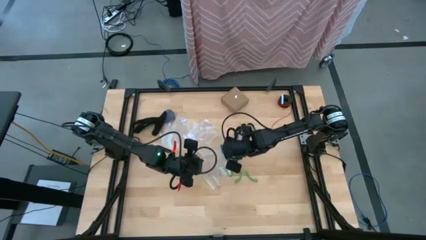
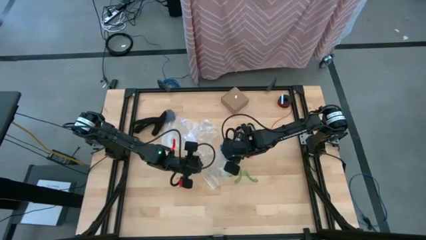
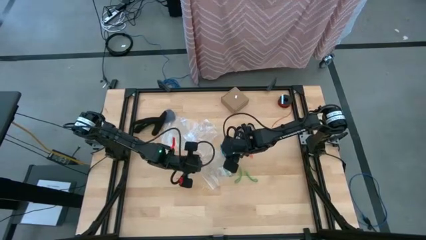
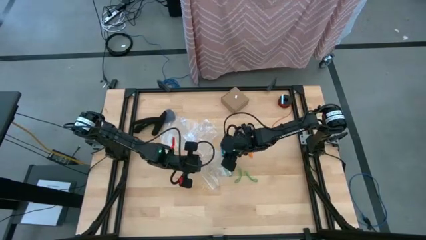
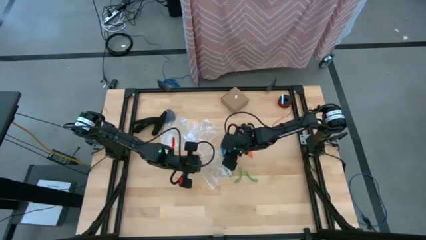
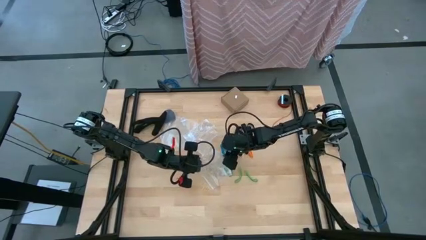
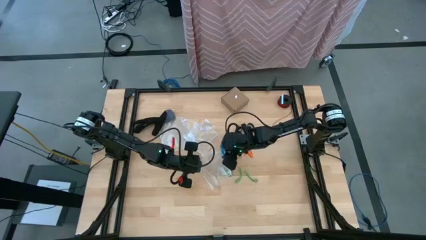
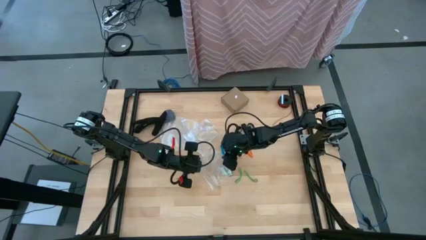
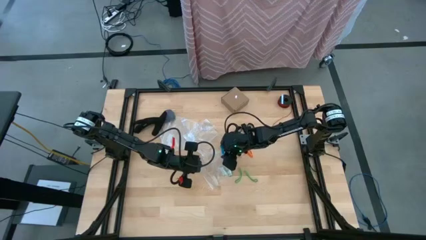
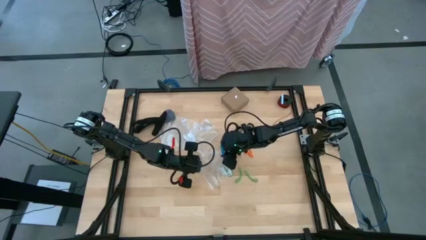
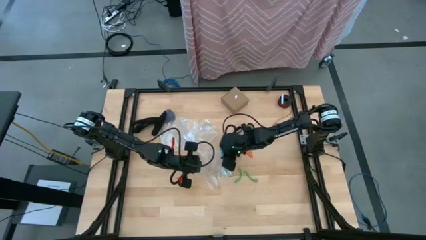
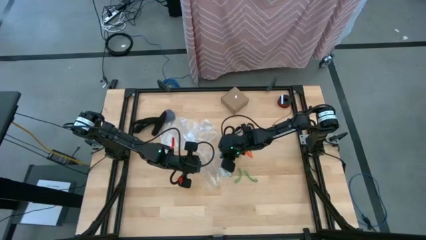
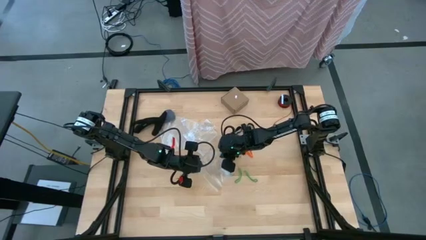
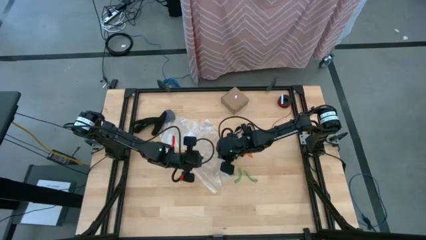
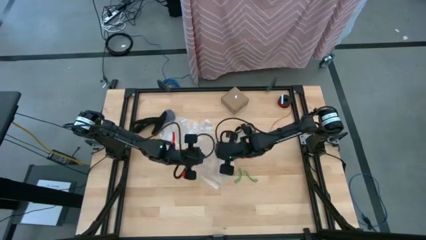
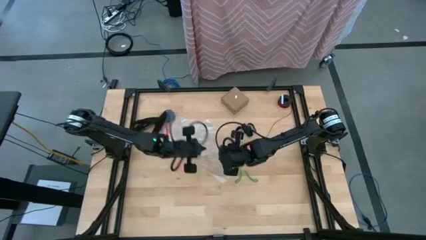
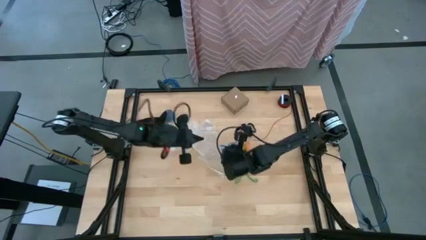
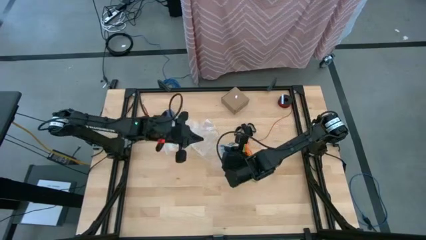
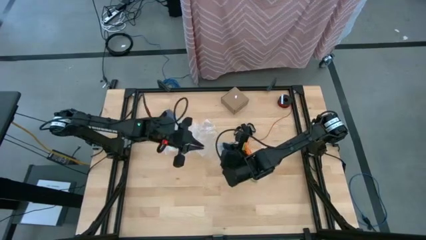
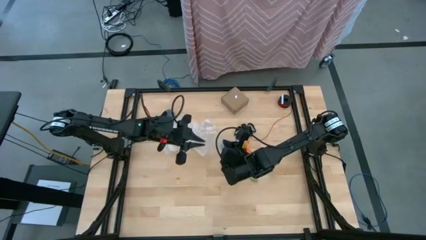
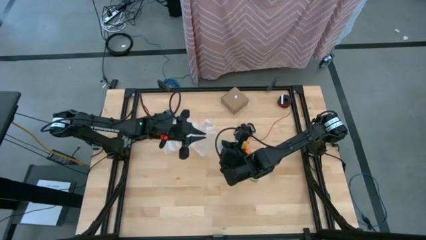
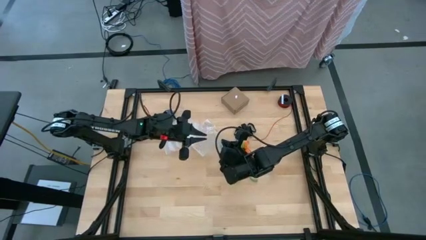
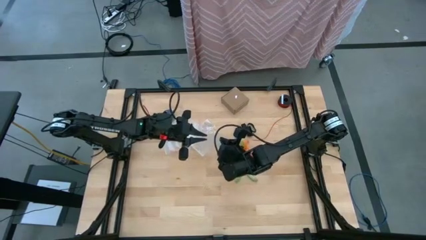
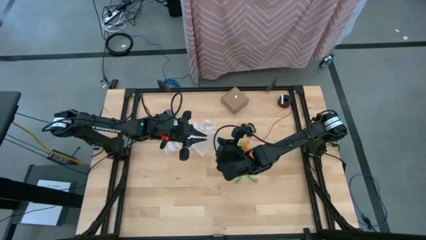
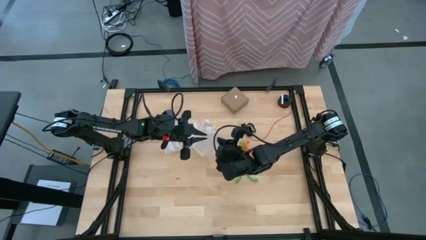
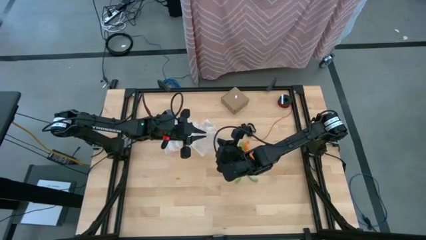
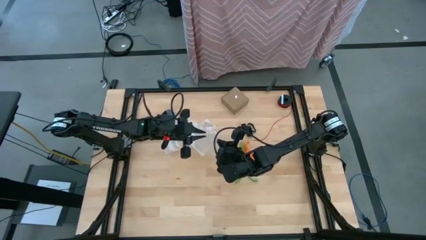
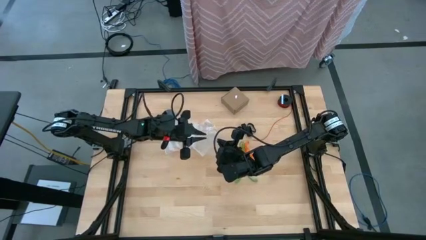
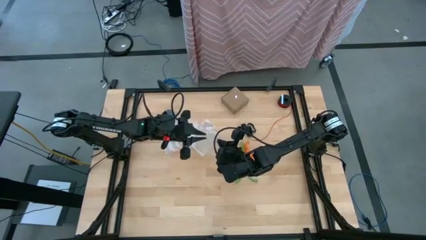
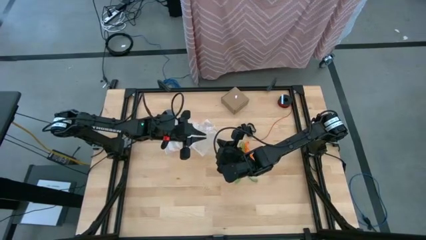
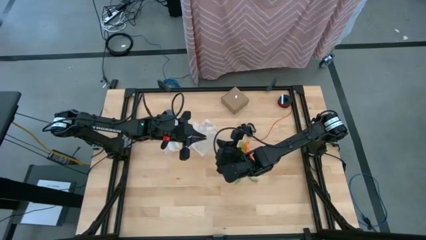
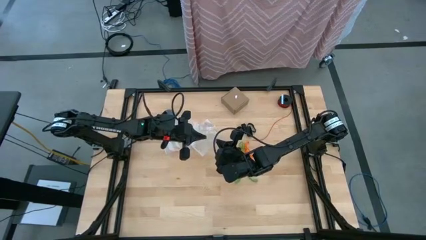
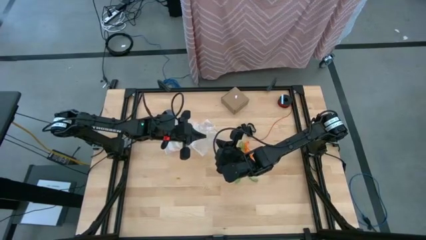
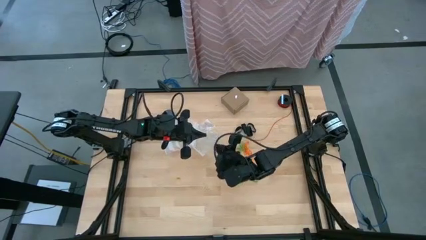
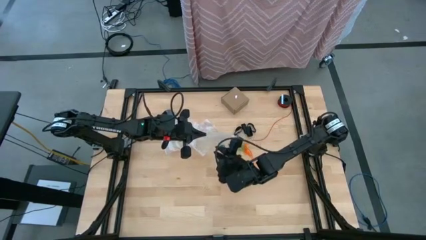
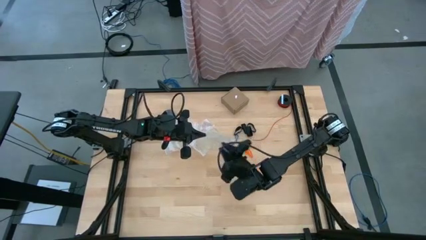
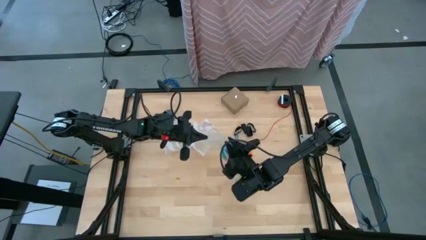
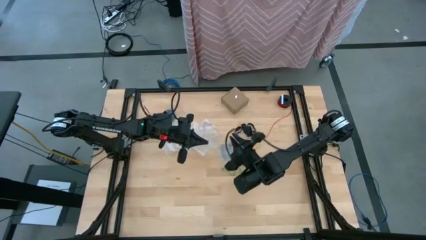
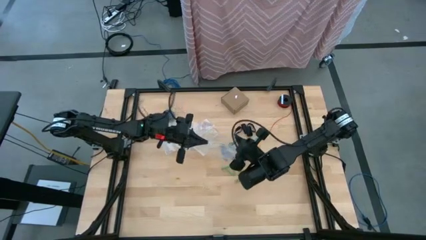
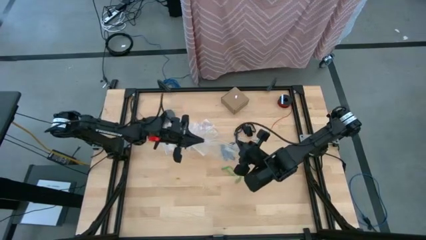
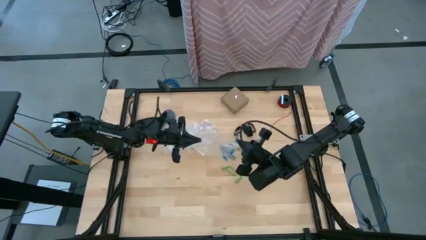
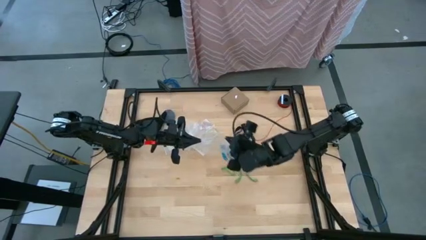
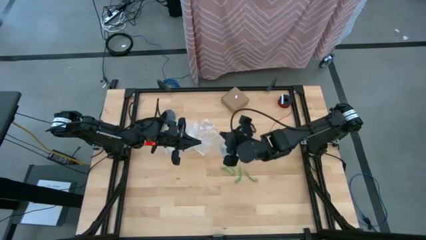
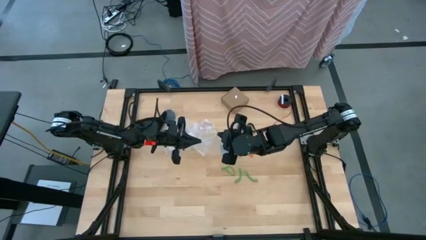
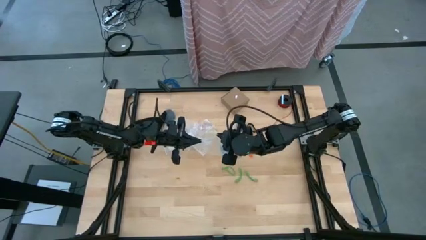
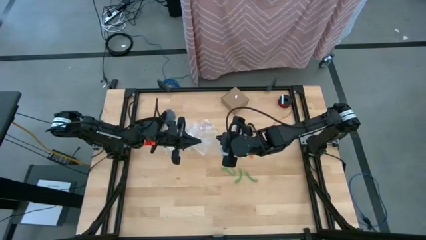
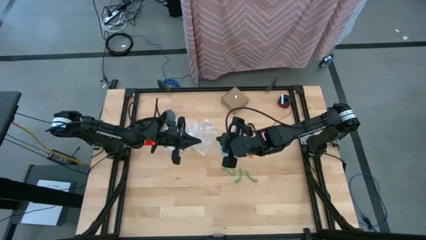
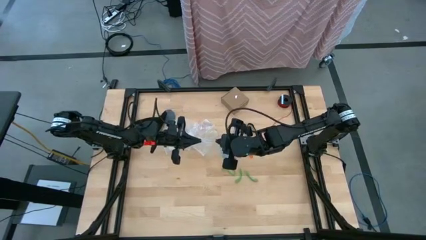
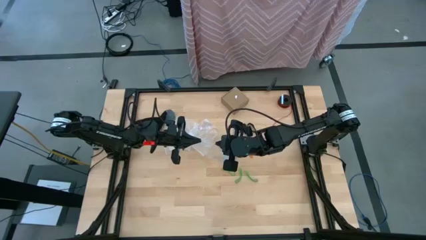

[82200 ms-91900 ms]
Task: Sort rubber bands
Open the transparent zip bag

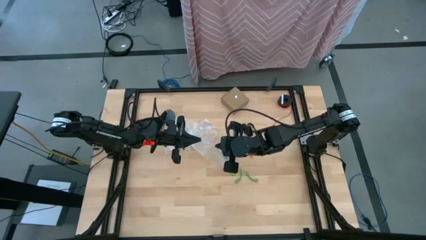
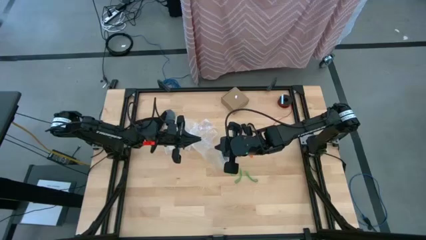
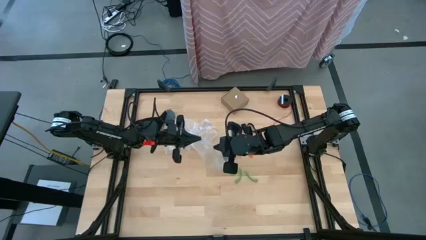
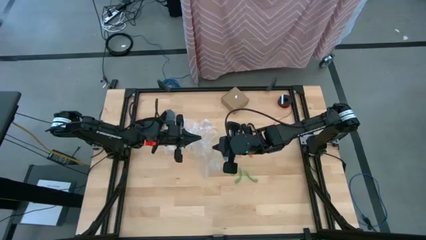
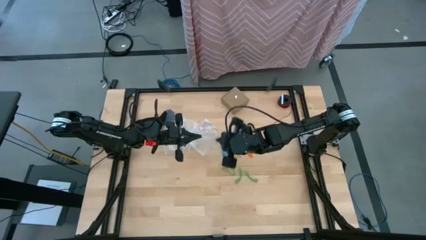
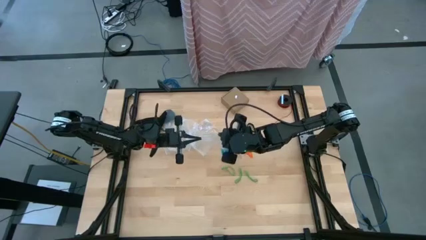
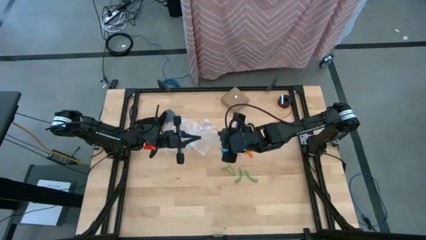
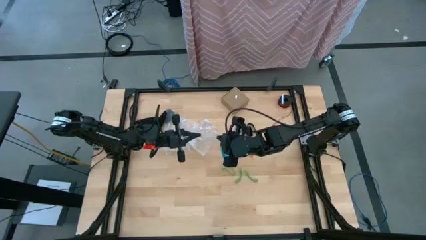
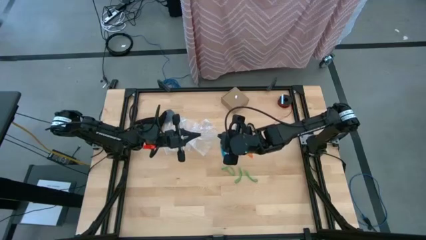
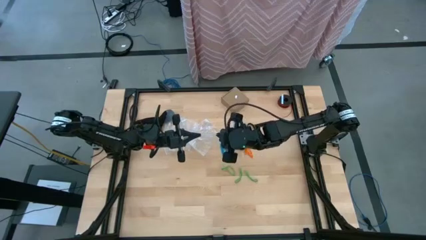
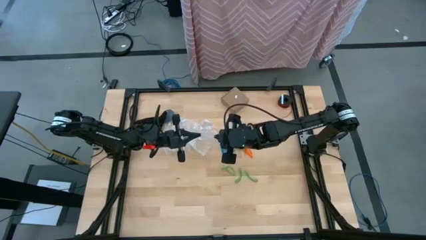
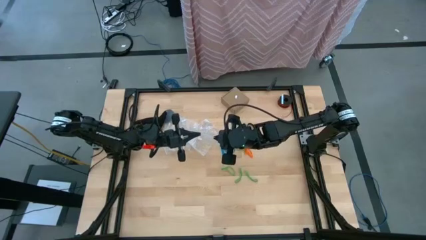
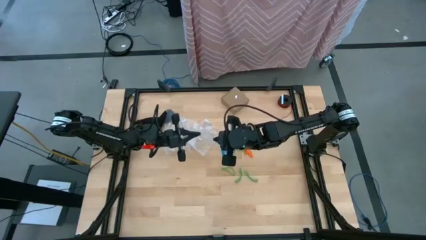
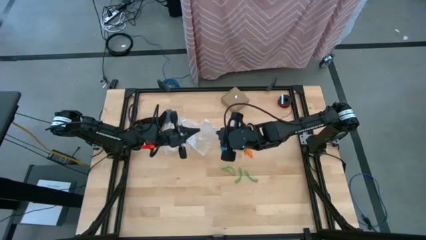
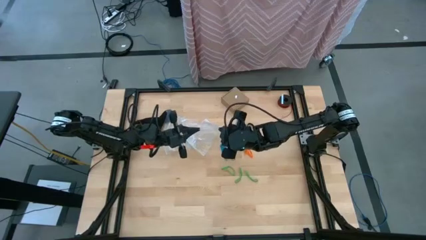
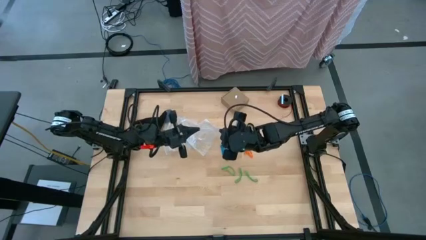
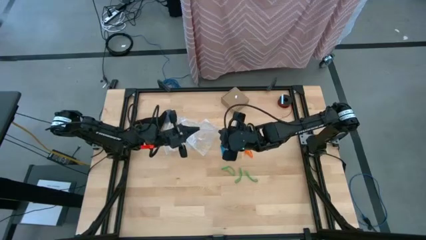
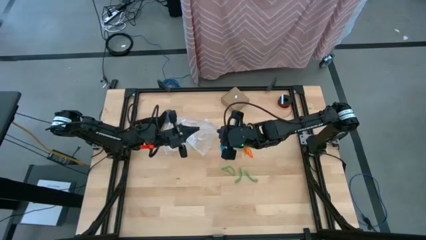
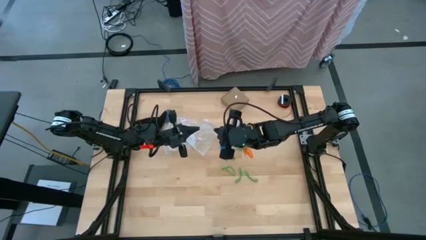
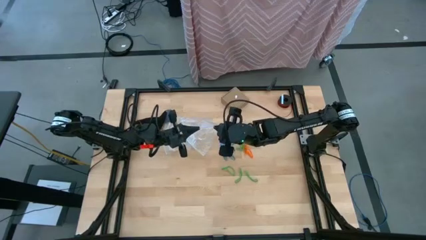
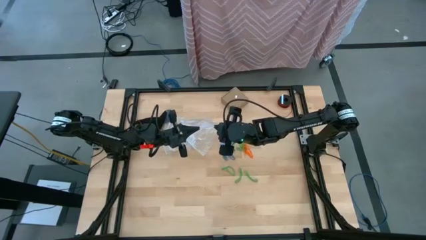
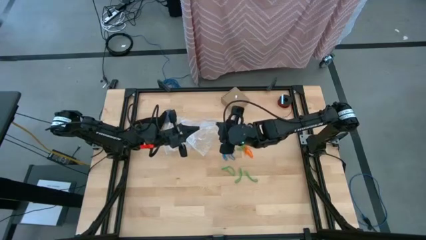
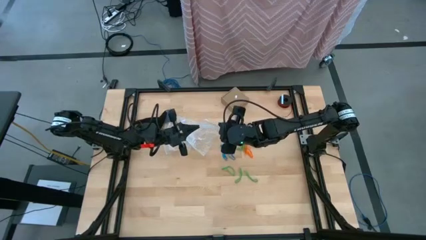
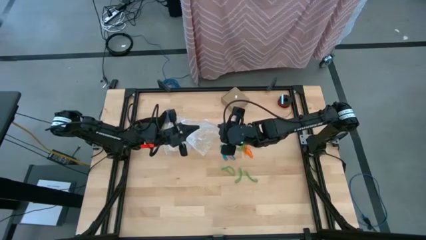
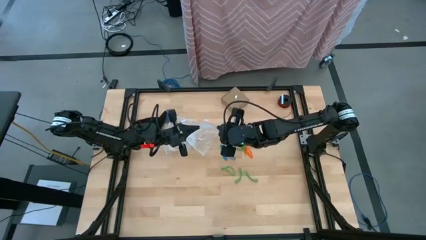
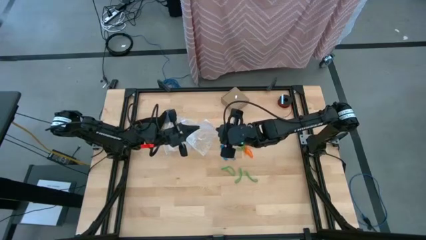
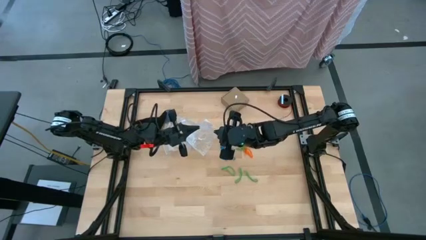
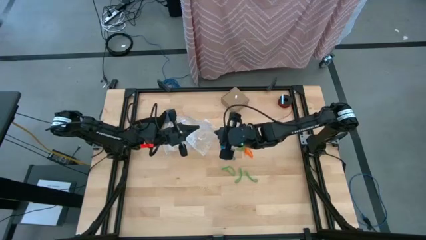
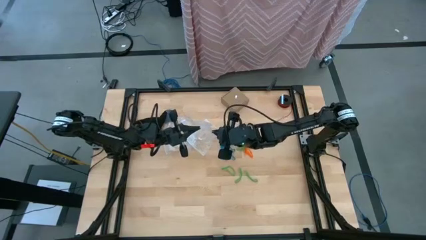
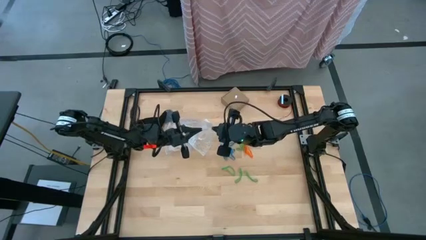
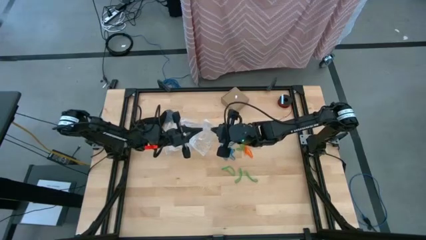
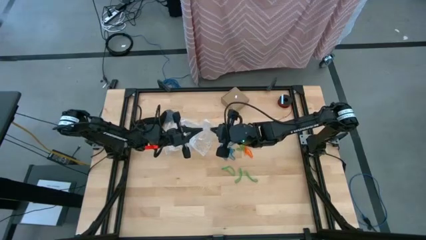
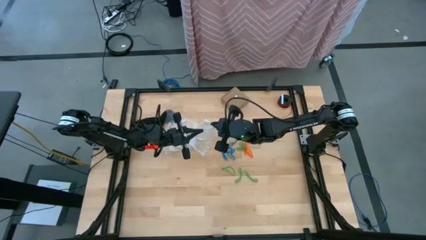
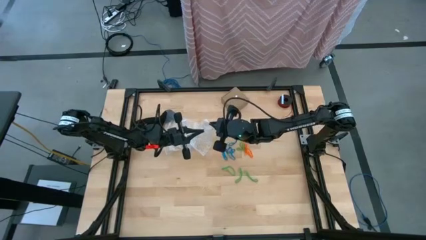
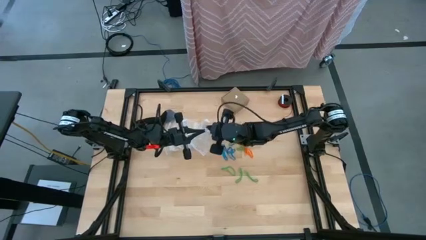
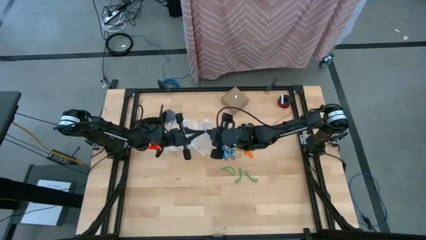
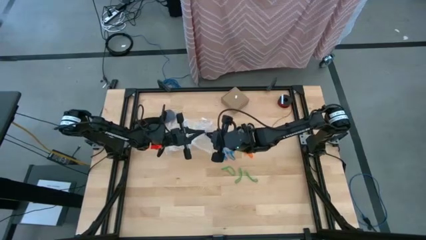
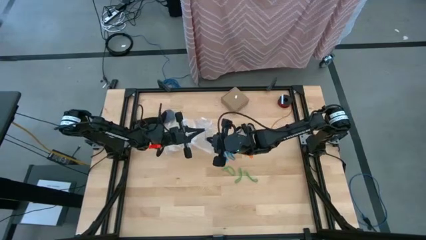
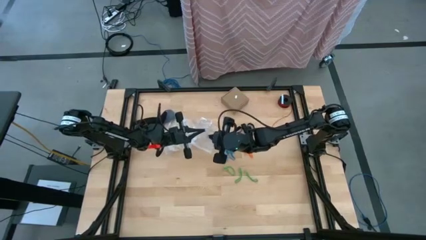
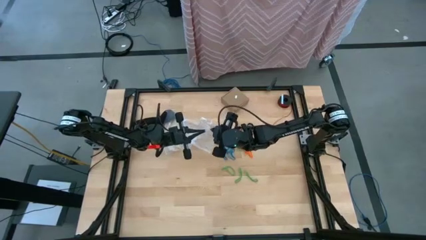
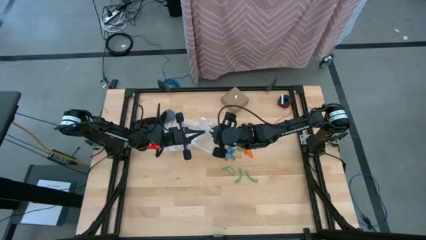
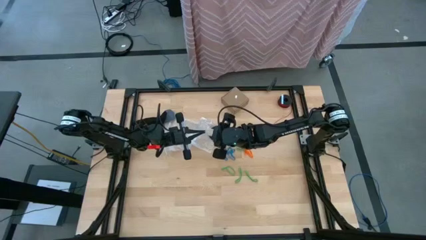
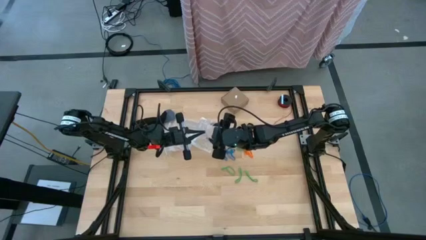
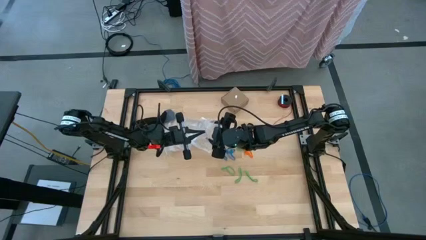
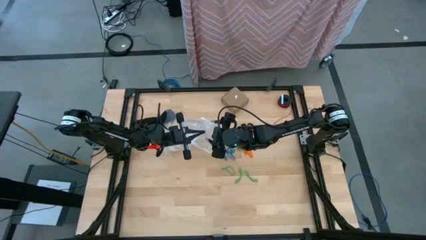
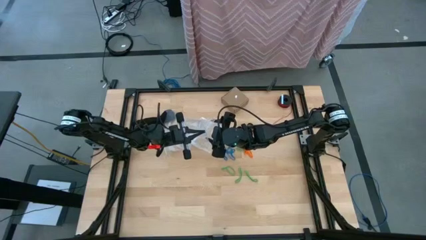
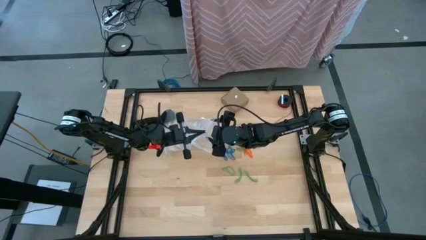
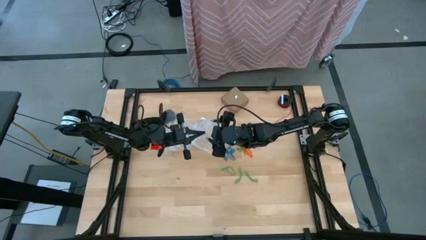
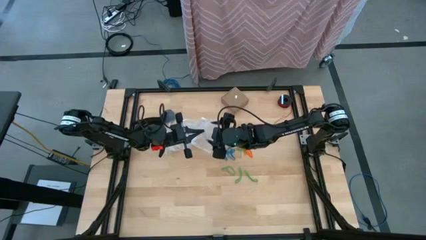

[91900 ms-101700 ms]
Open the transparent zip bag
